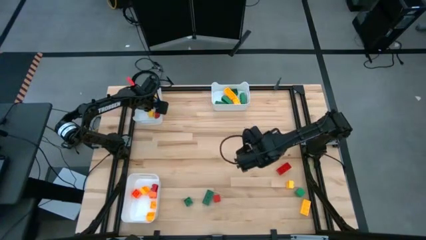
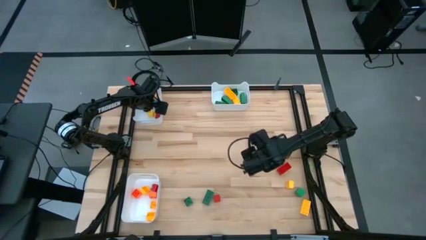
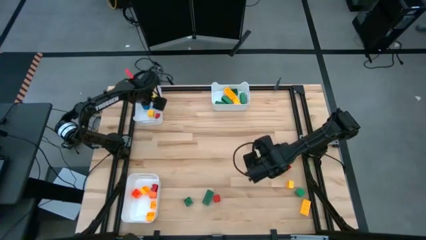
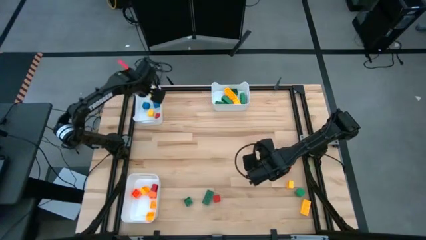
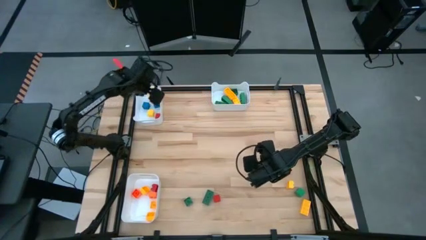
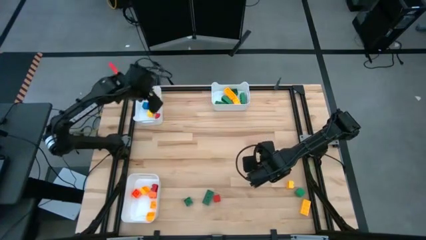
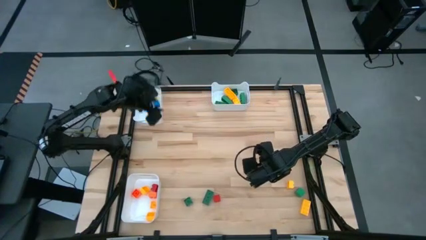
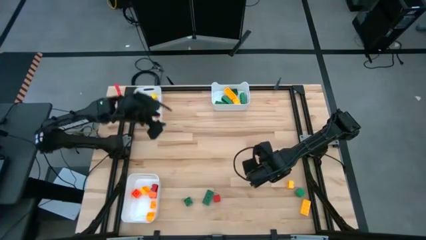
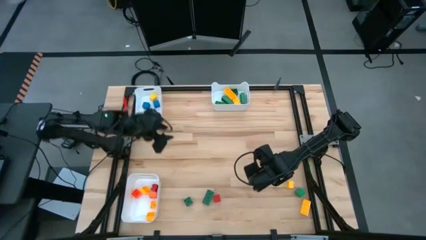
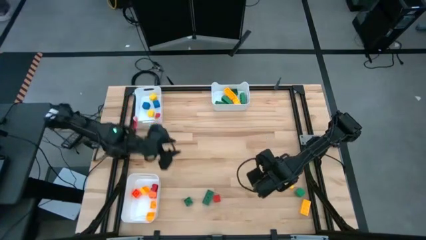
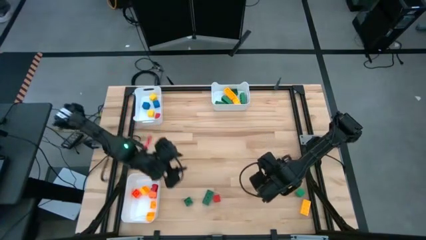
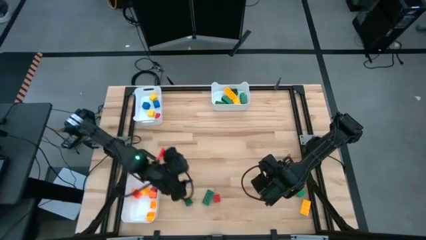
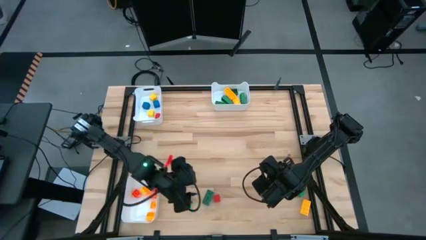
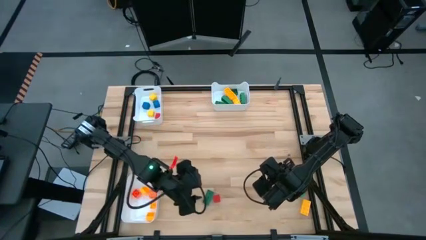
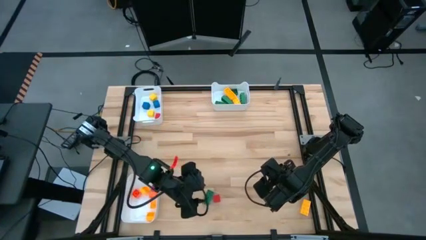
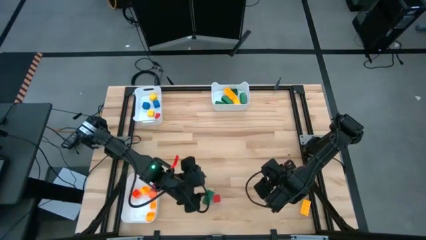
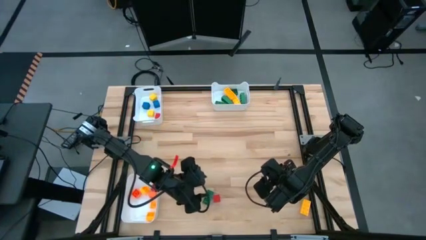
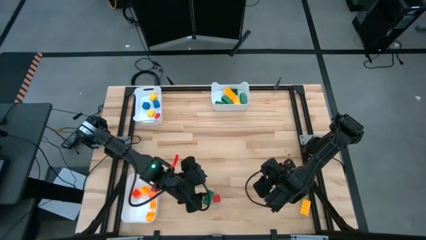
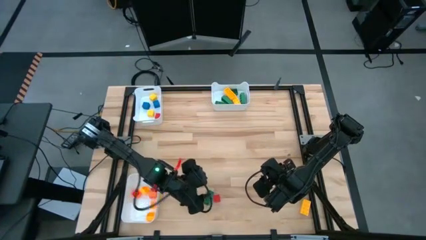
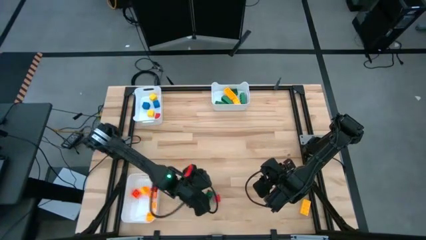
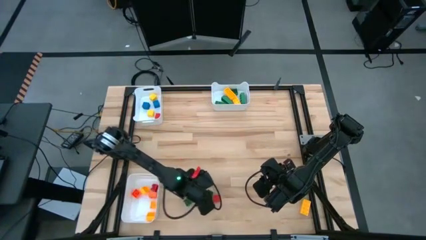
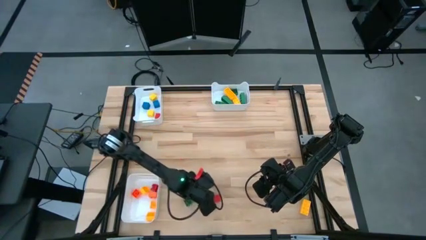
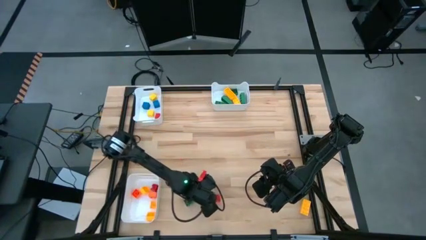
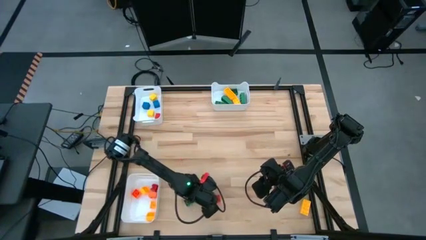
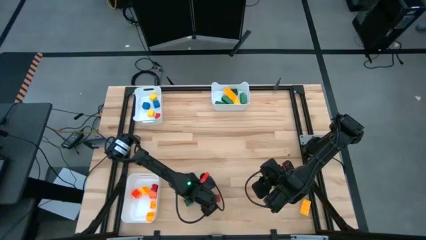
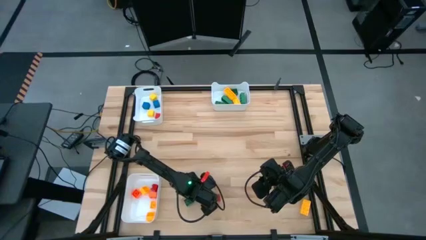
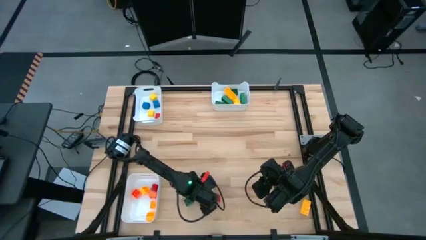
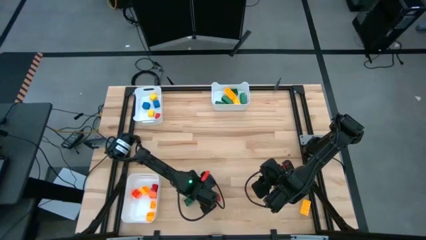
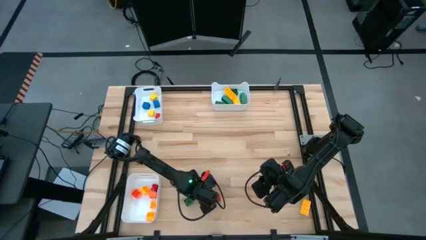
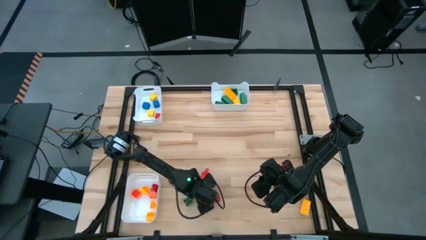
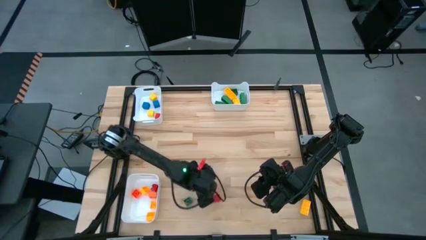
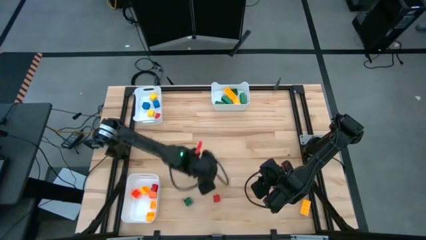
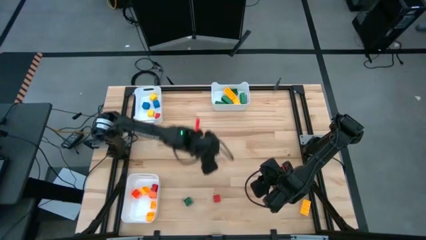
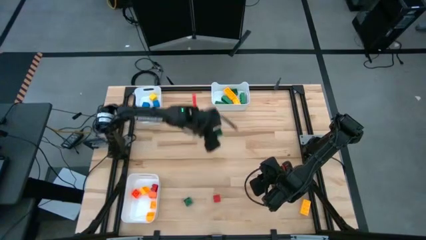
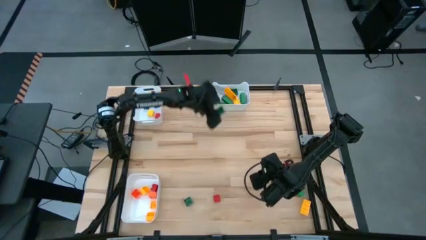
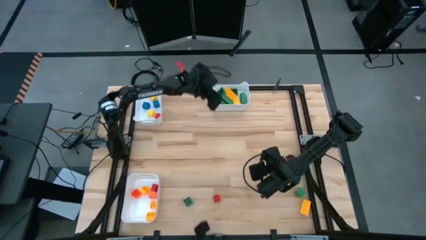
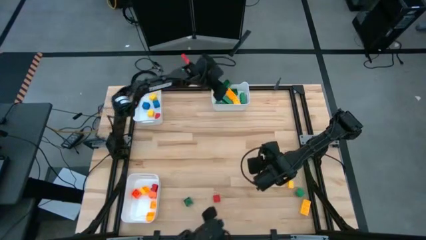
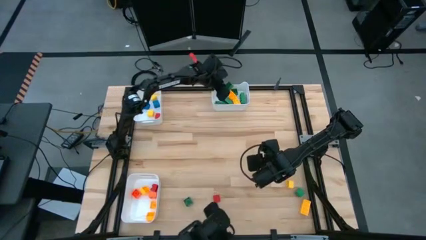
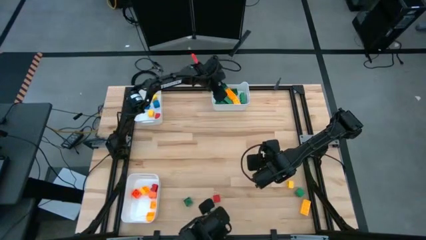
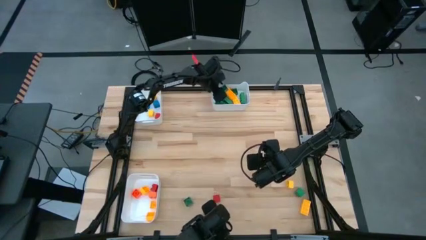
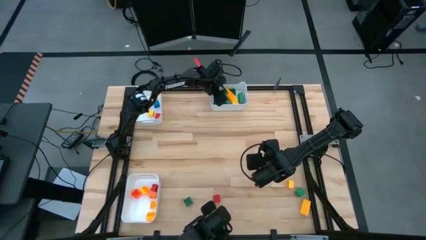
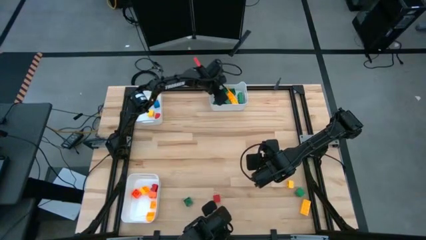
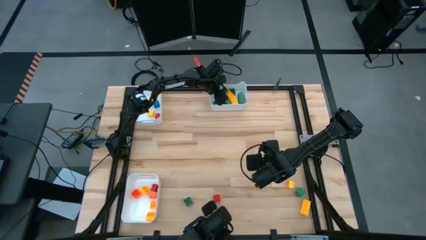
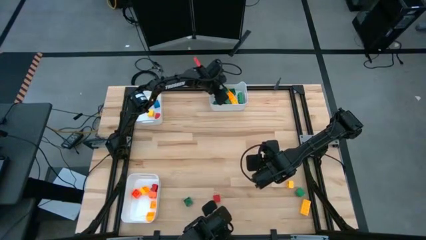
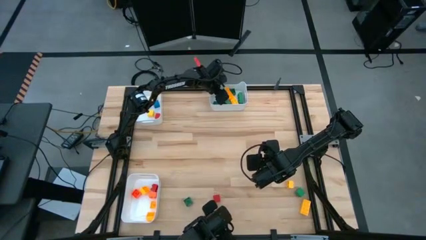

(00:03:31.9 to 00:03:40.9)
Task: Sort blocks by size
Put the green 8 stud game piece into the top right white bin

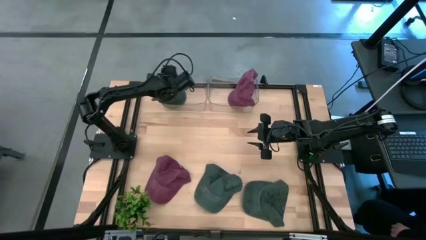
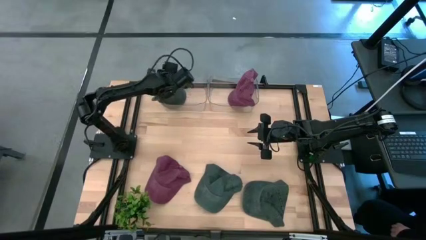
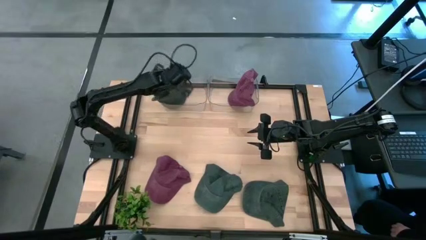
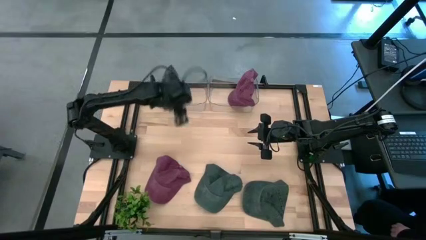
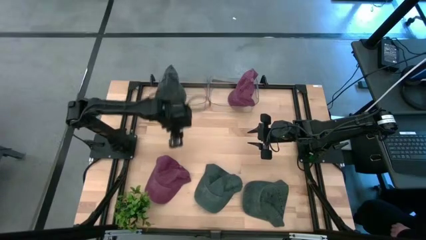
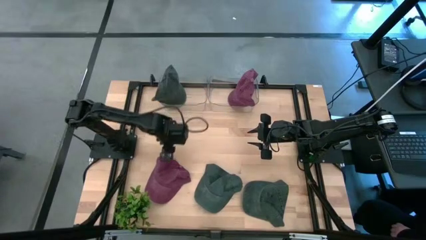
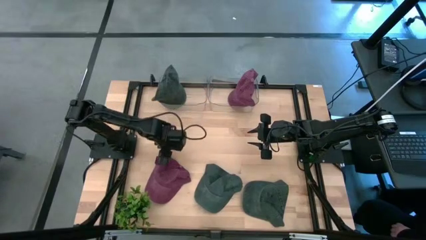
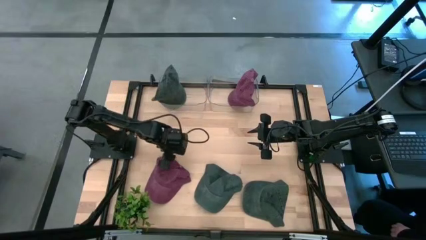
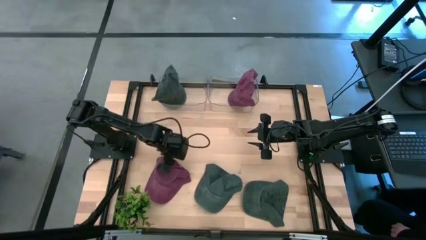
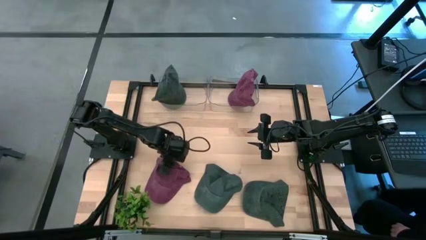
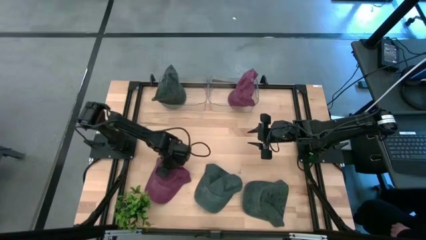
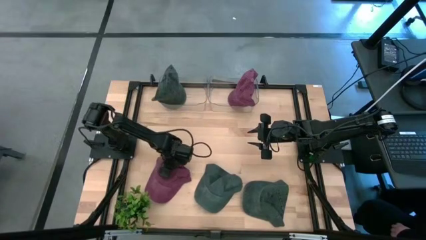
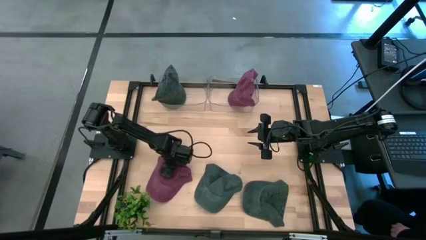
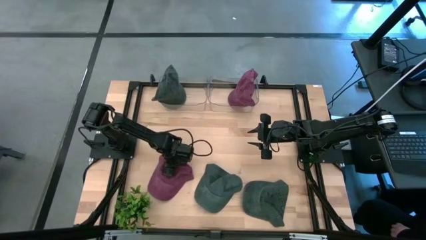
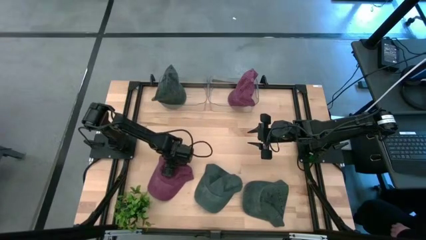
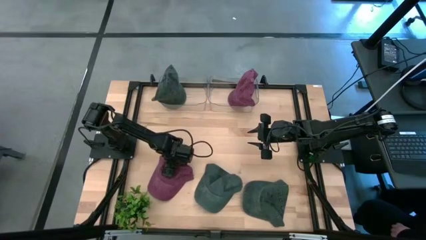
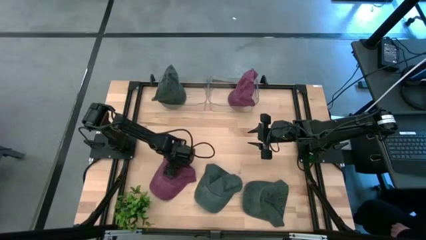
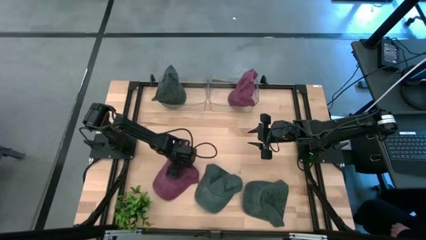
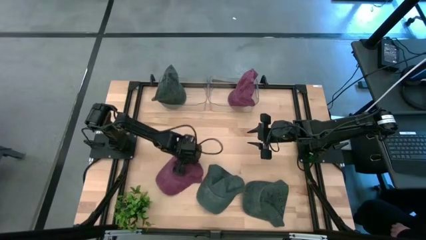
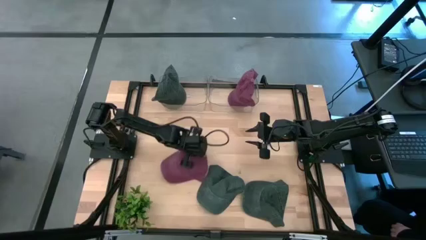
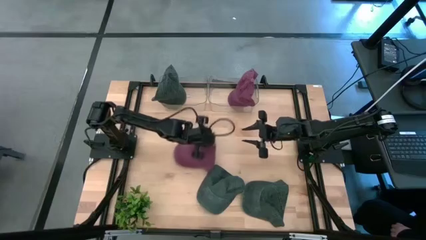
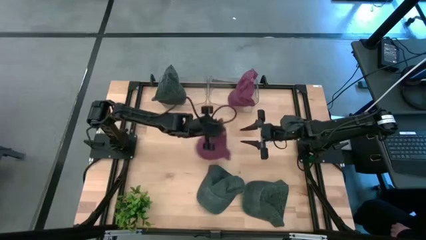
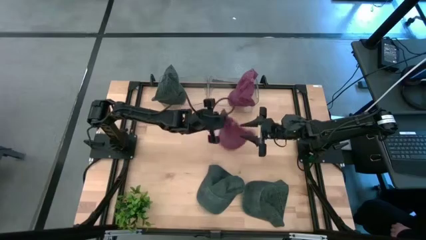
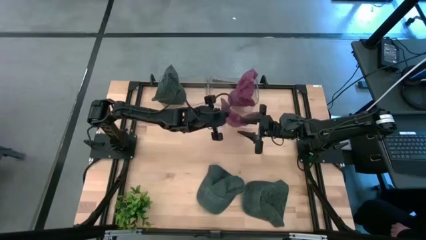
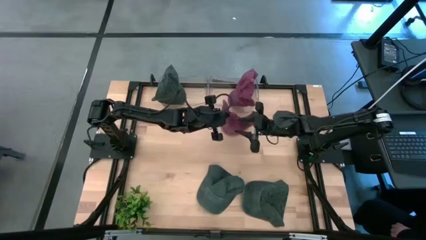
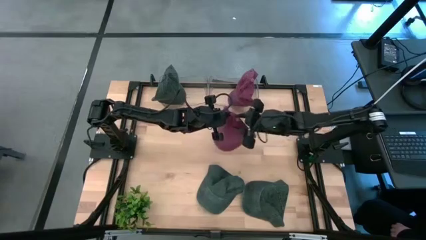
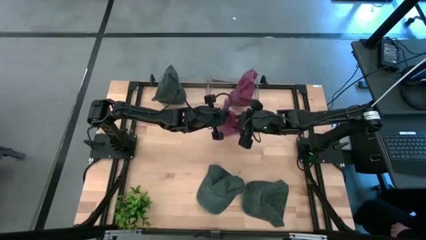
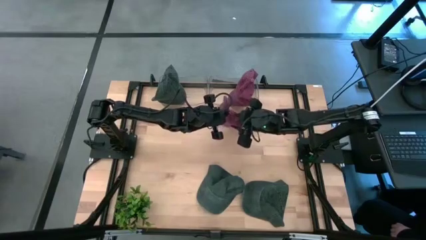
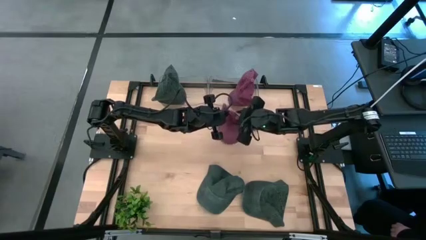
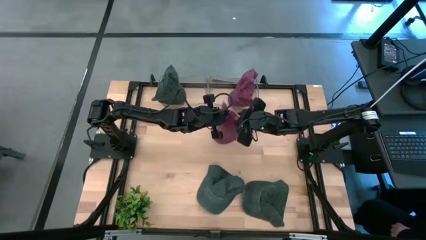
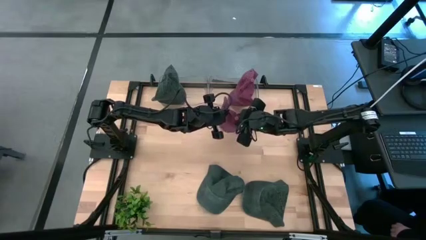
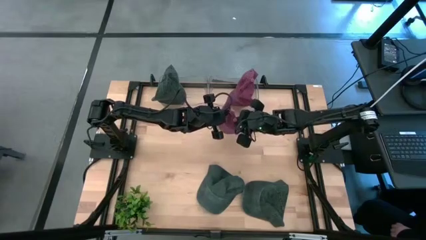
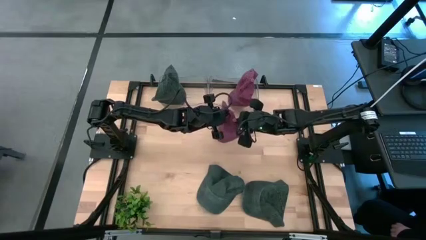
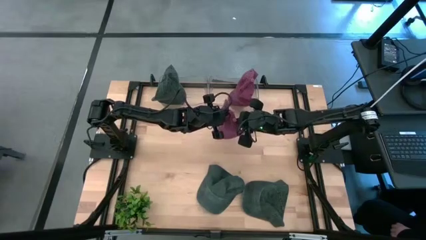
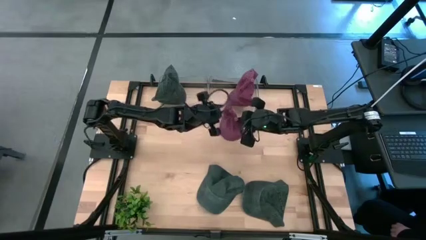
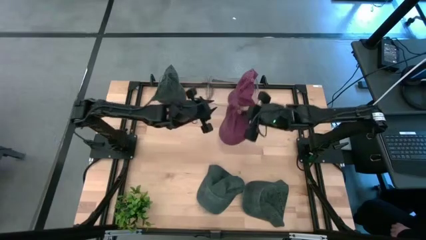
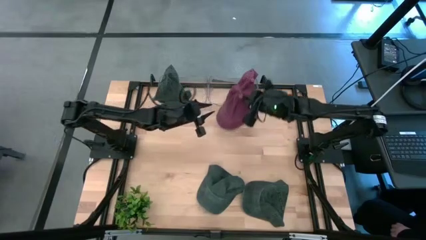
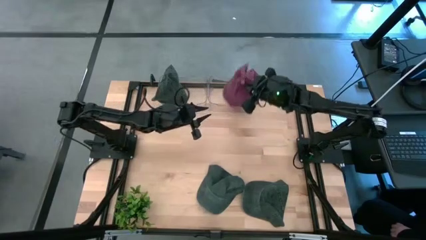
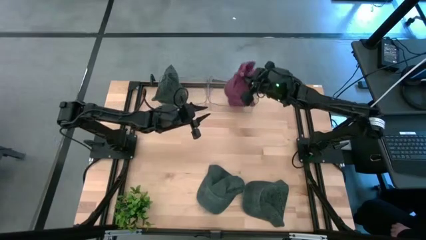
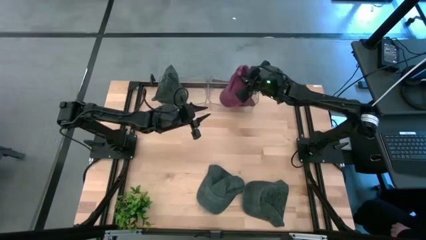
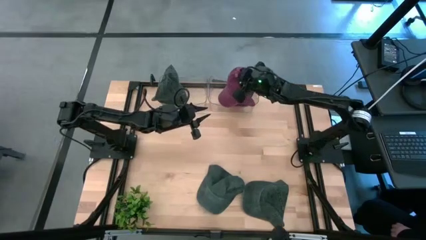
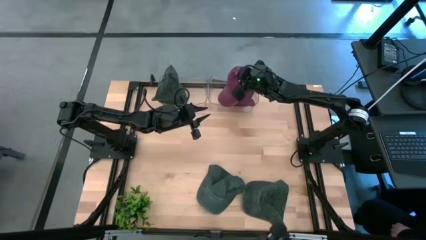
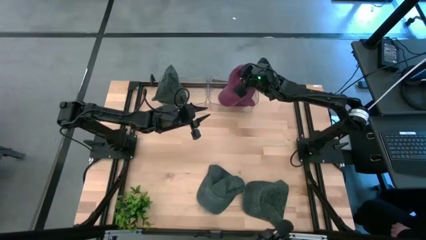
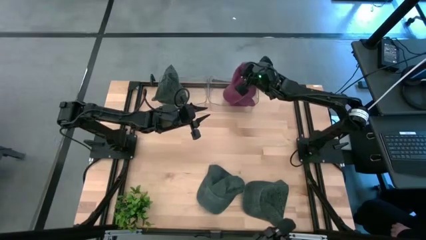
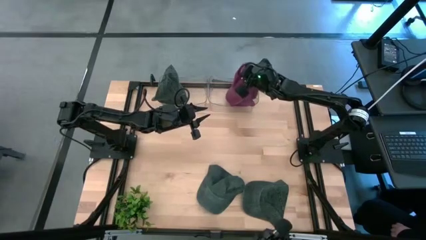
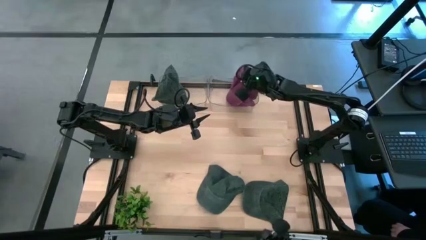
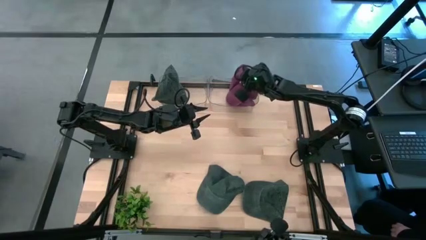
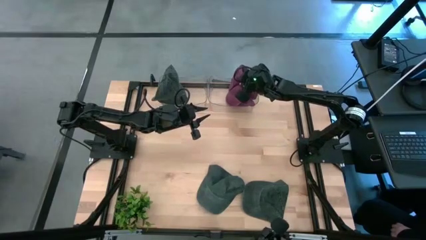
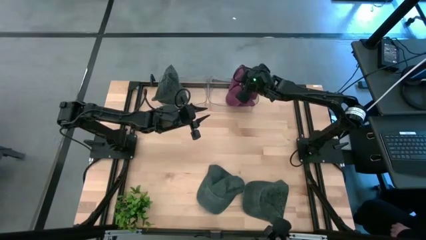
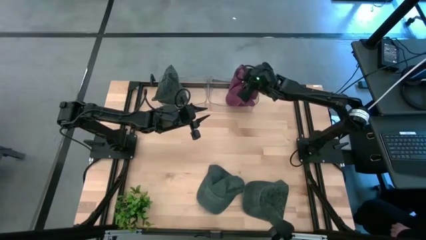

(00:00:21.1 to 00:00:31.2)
Task: Pick & Place hat
Put the red cap into the right transparent bin
